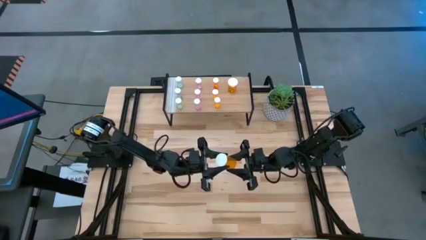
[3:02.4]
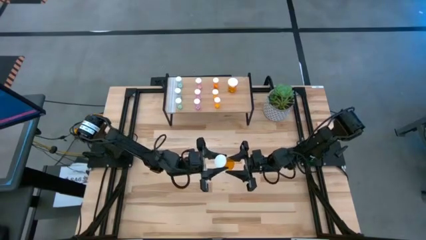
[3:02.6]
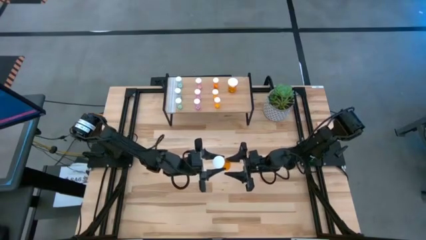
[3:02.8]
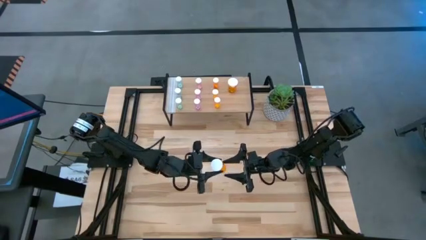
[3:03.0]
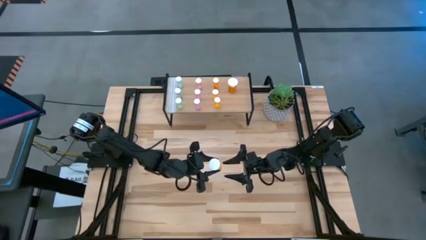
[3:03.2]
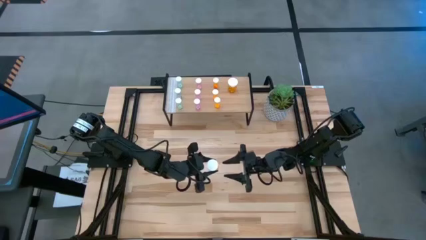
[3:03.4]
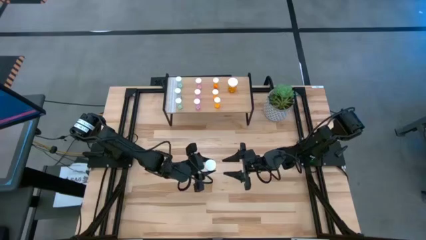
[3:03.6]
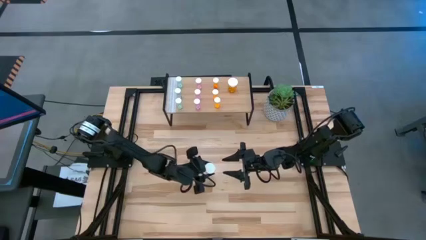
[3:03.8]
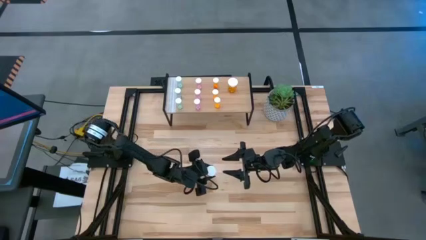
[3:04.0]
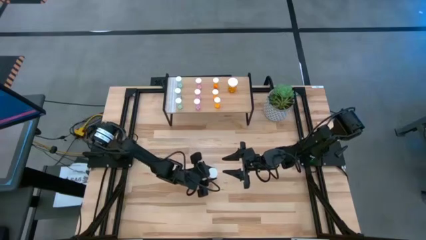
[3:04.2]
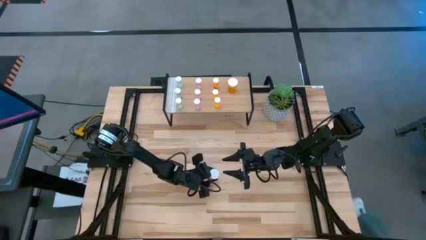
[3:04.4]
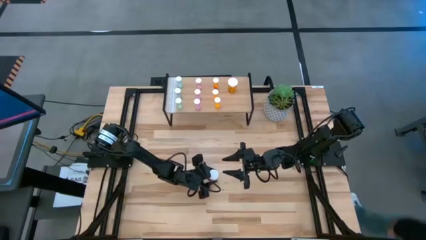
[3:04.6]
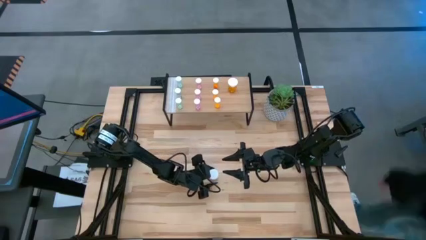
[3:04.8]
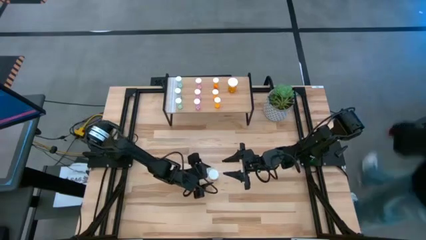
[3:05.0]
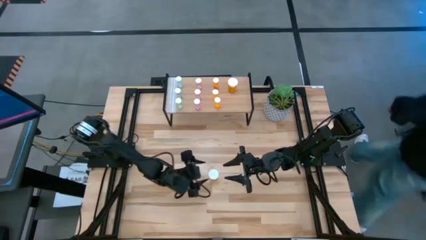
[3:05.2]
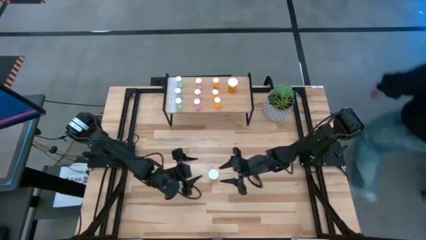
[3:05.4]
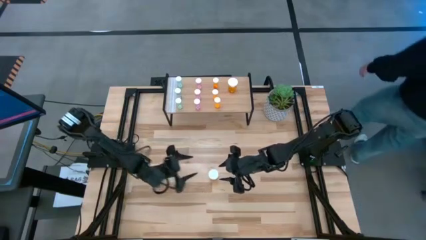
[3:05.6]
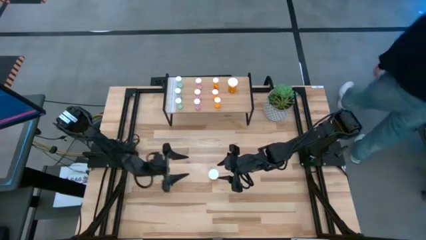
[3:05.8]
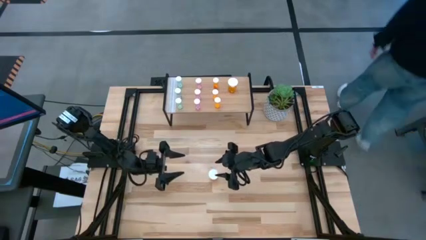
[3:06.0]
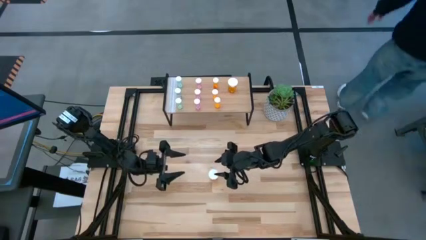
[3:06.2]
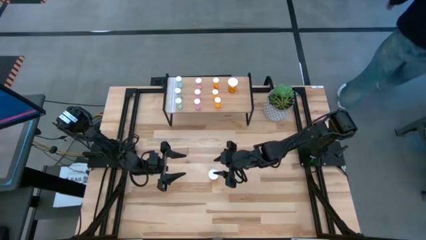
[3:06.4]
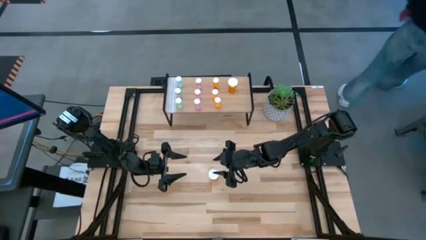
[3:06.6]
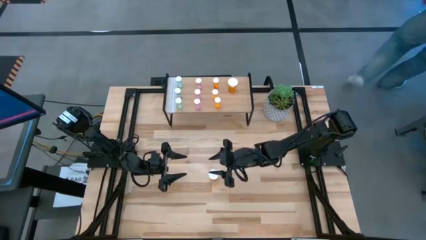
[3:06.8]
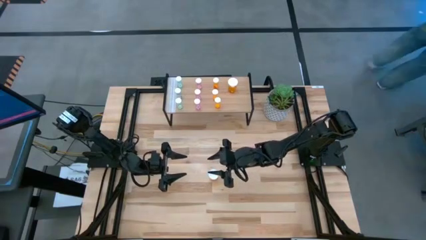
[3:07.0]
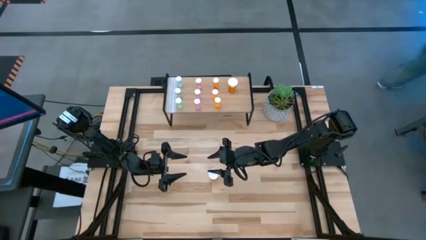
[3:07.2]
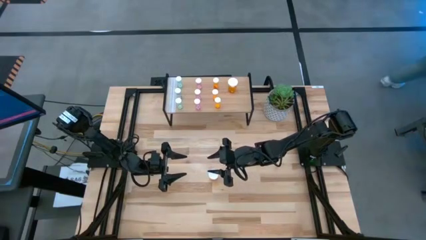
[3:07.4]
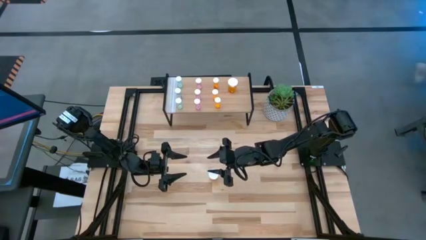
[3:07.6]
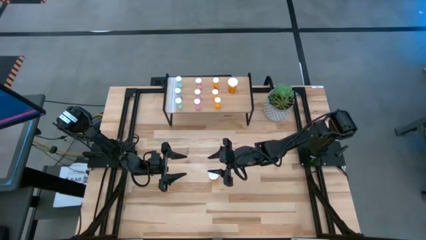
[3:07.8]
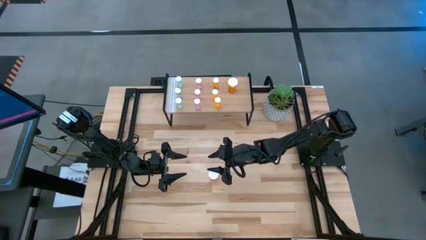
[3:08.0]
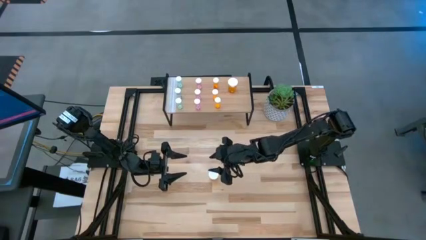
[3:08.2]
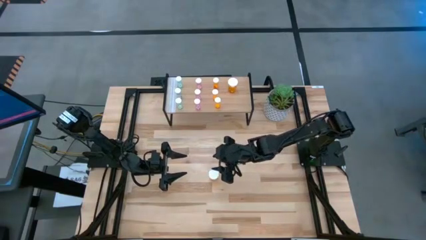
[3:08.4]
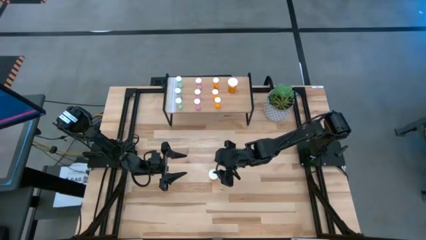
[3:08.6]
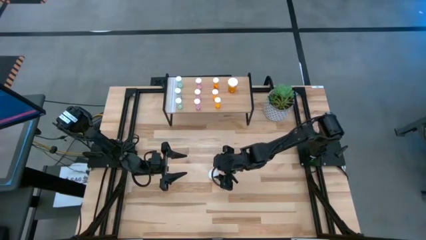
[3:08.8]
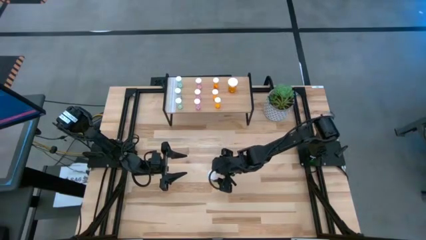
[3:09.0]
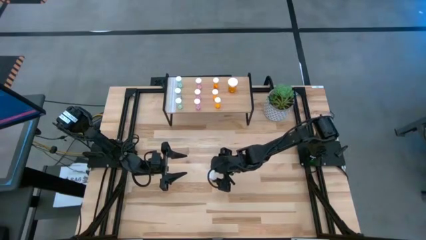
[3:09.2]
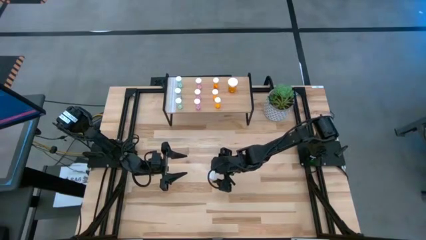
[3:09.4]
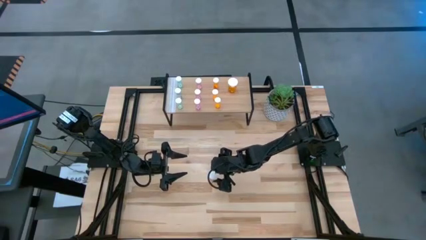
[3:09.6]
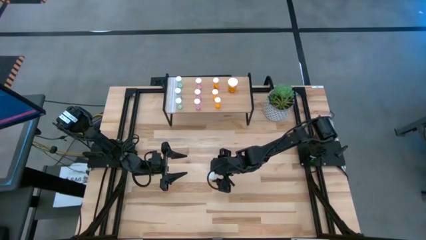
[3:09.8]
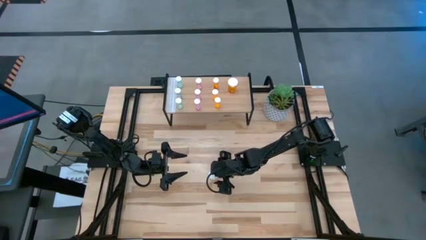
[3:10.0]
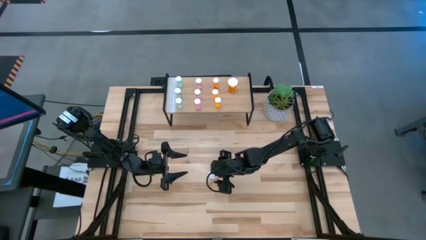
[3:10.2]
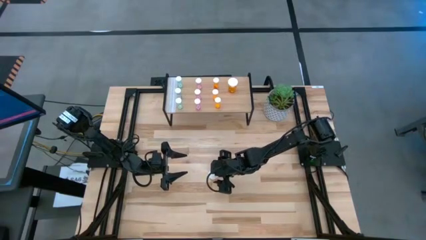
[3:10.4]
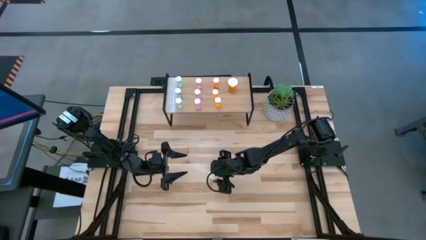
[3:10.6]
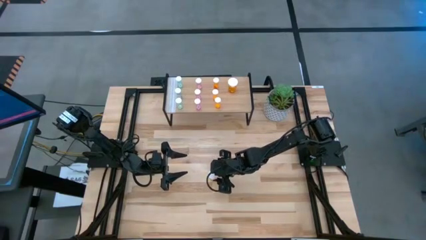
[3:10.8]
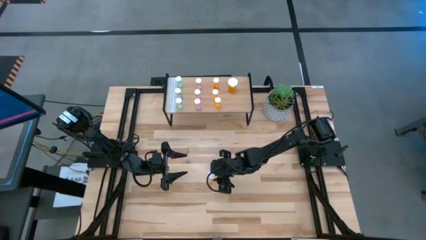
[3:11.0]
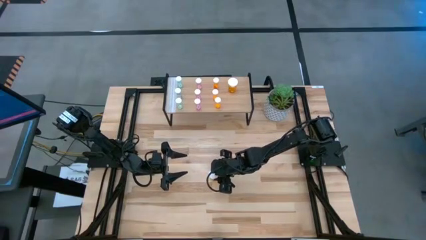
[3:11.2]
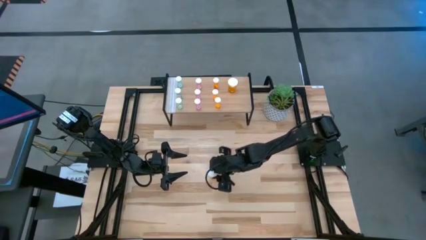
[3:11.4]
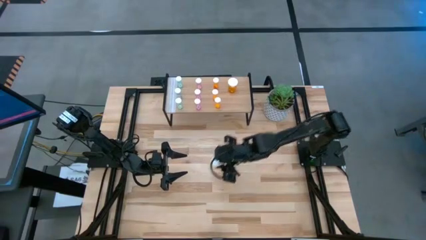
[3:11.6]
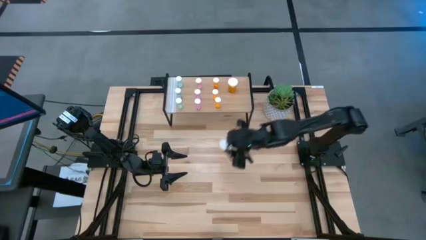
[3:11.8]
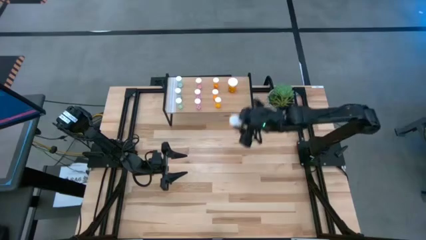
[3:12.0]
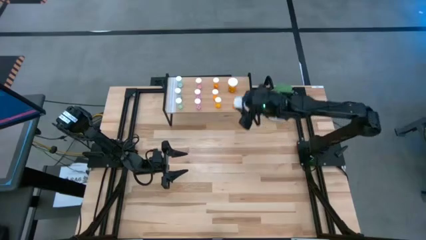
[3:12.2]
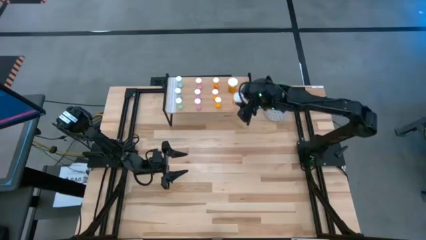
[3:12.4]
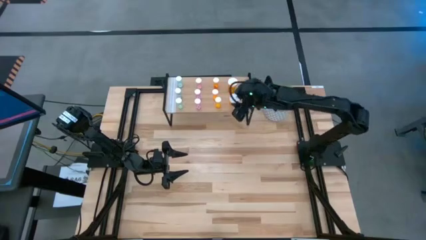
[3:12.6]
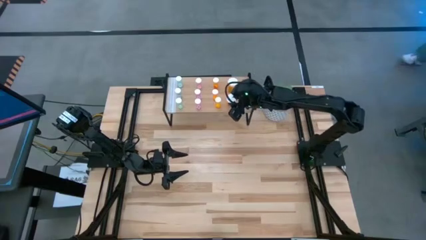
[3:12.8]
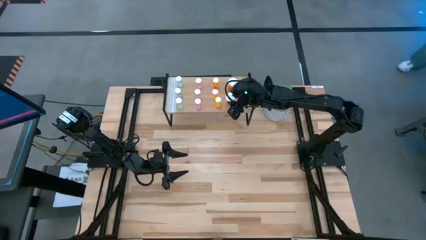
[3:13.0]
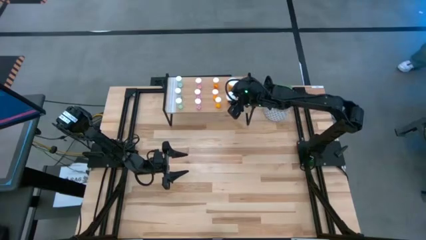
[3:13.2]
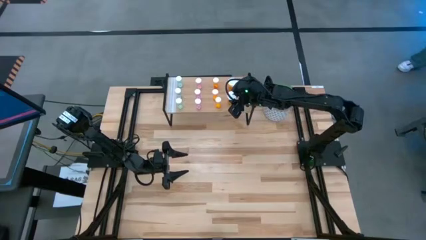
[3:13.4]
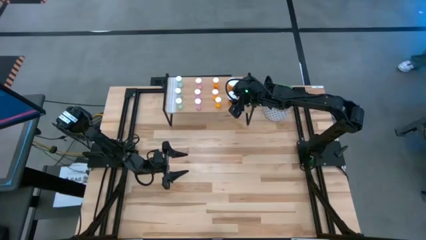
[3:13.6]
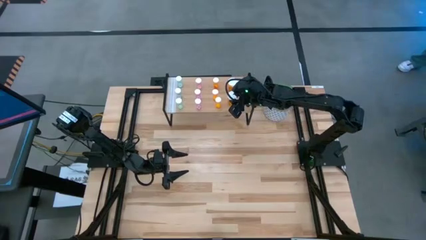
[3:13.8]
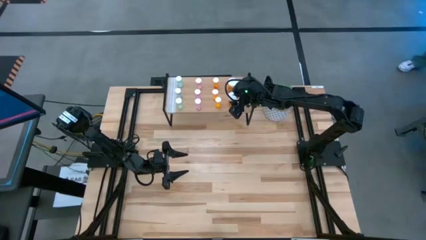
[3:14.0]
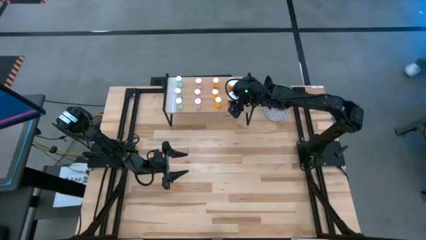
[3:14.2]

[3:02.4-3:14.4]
Task: Pick and place medicine bottles onto shelf by color
Put the large orange pill bottle on the shelf aligned with the other large orange pill bottle

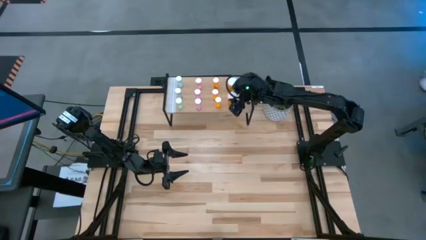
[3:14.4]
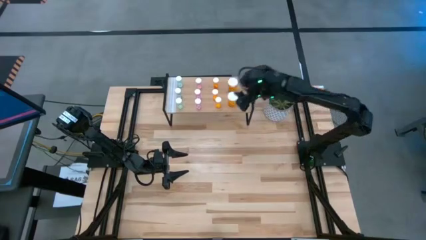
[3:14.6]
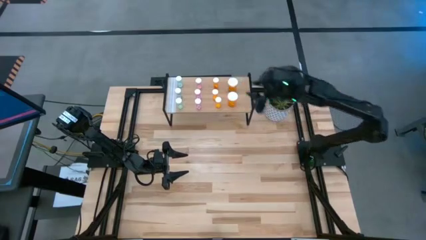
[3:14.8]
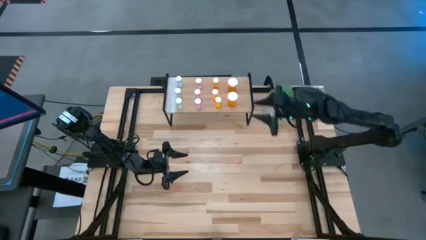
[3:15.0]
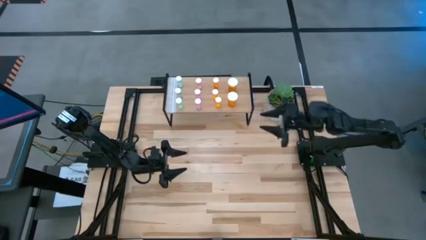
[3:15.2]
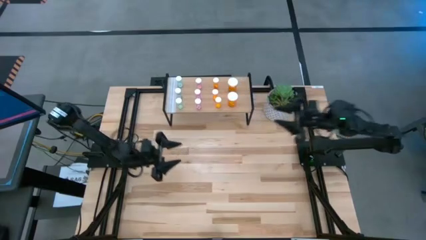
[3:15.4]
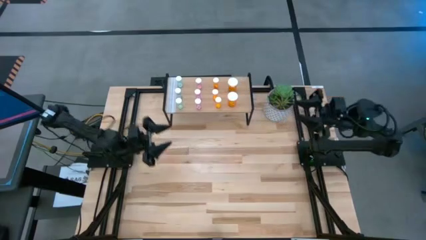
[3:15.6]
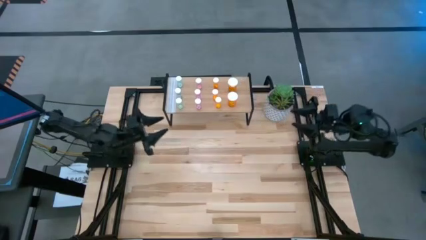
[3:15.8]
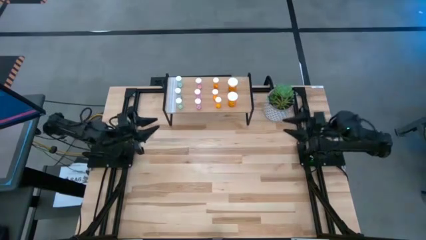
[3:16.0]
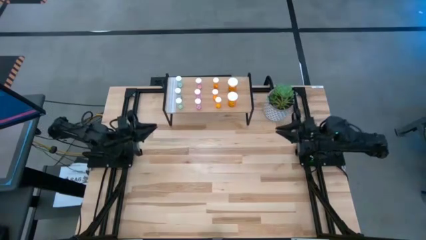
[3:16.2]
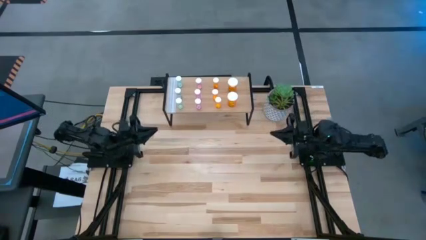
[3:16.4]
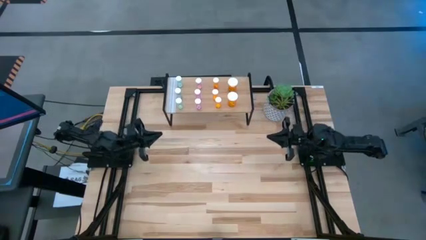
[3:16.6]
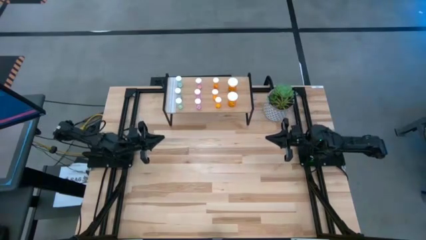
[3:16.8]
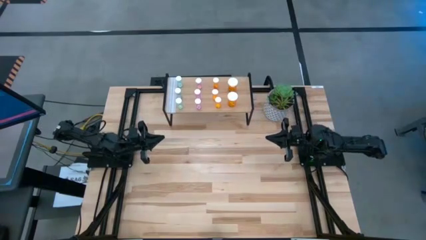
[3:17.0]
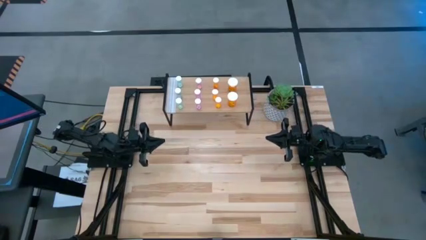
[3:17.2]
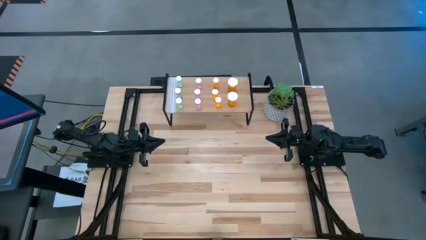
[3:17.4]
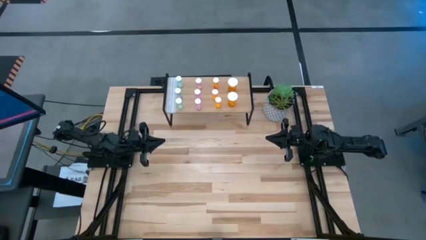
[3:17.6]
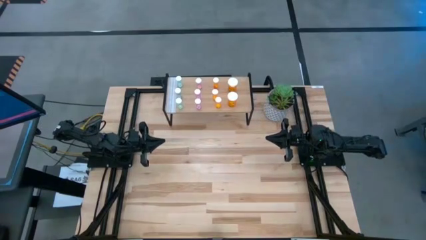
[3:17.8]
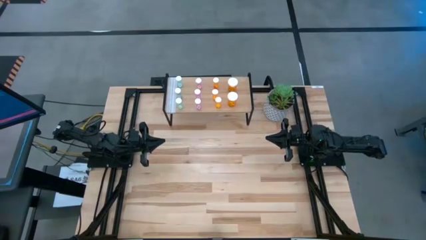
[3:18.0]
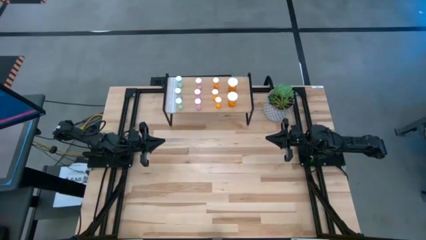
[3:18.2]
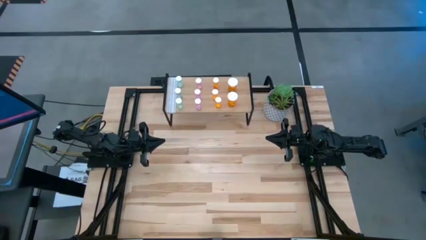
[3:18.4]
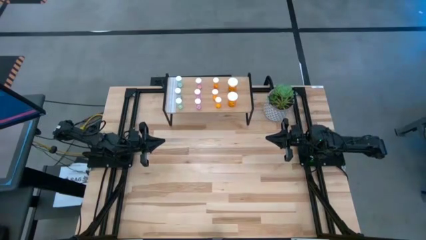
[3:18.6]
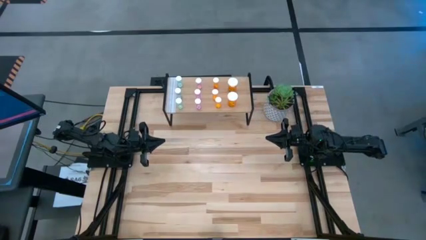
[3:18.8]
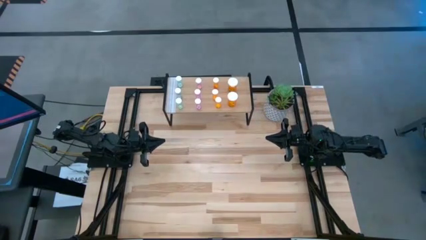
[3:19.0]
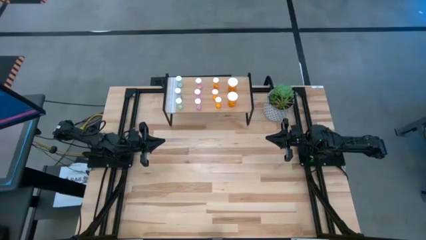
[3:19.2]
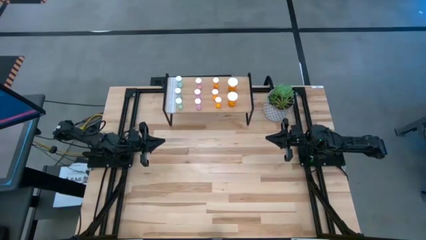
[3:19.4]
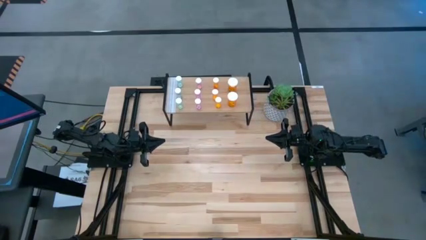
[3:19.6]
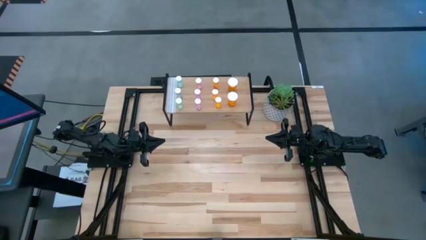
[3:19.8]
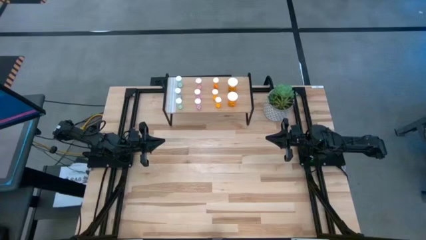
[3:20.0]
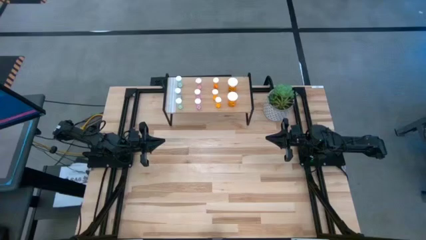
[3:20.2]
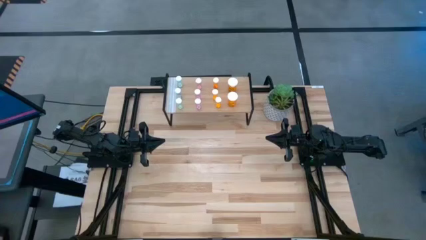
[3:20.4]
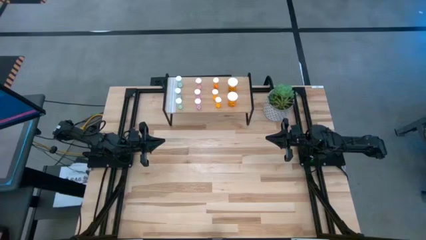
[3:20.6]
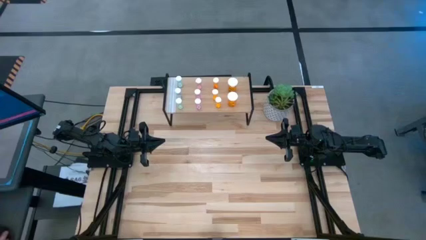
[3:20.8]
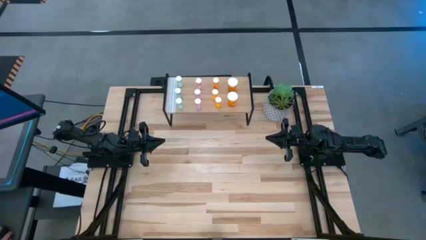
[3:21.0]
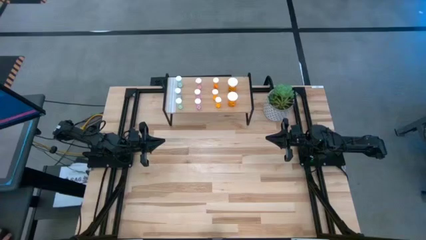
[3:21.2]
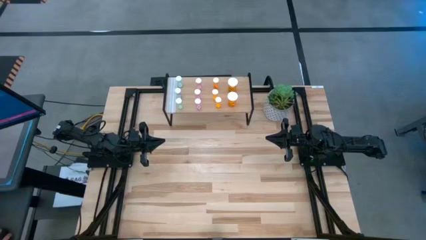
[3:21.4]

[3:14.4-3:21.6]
Return to Home Position
